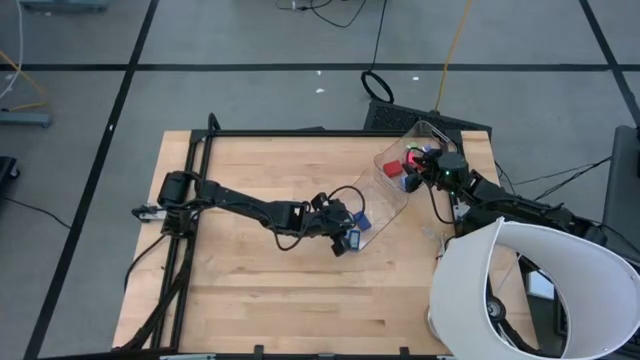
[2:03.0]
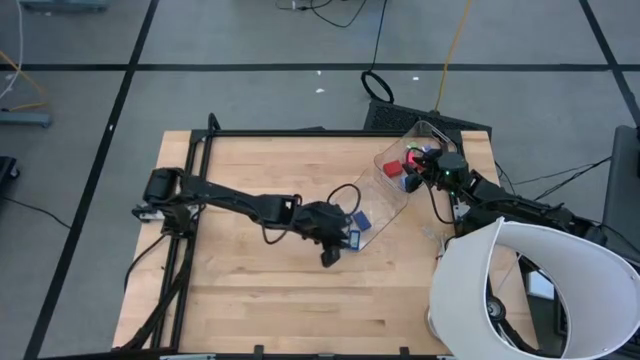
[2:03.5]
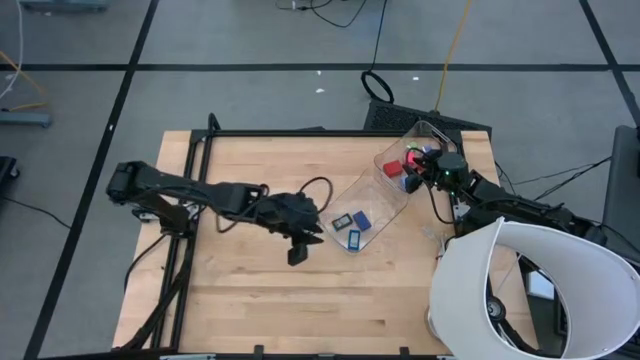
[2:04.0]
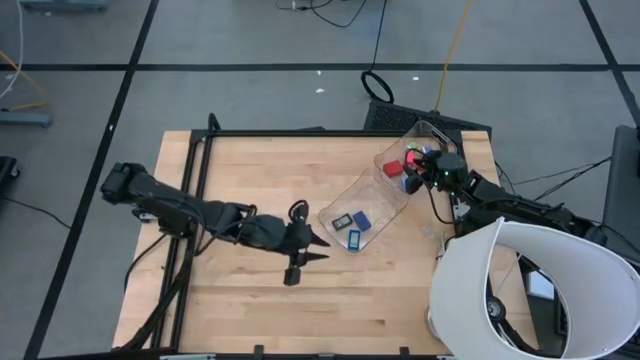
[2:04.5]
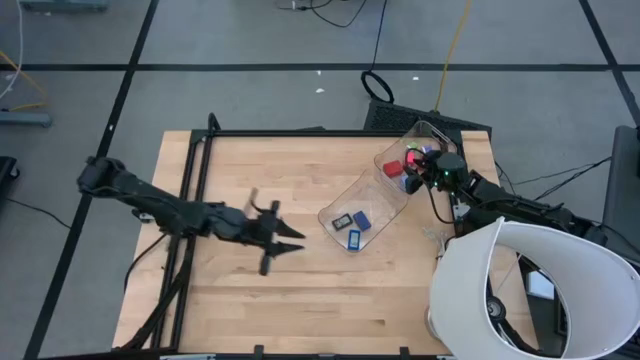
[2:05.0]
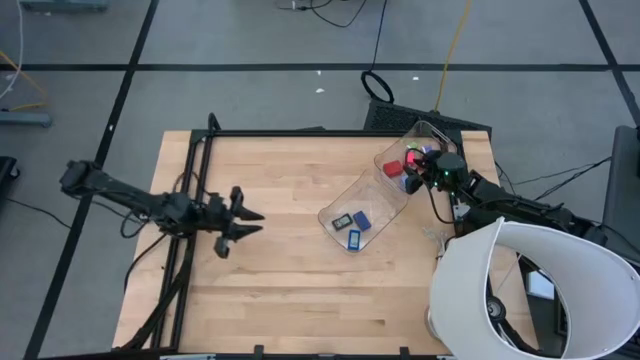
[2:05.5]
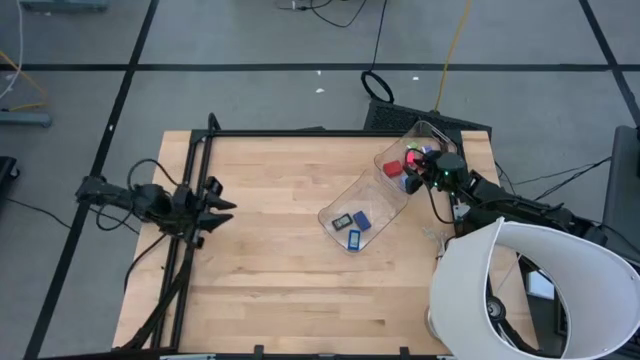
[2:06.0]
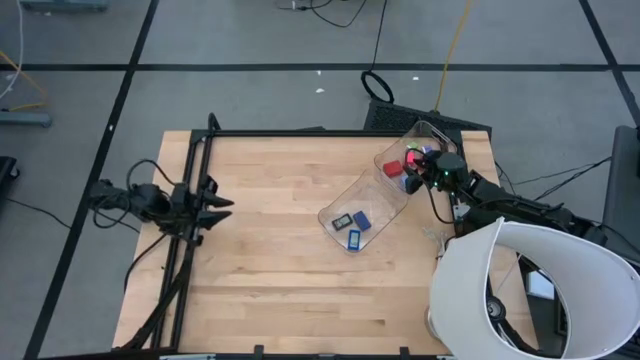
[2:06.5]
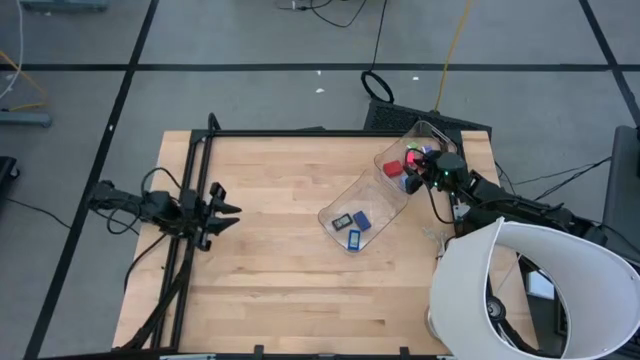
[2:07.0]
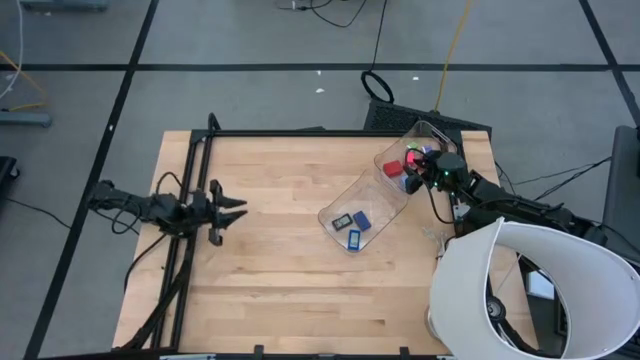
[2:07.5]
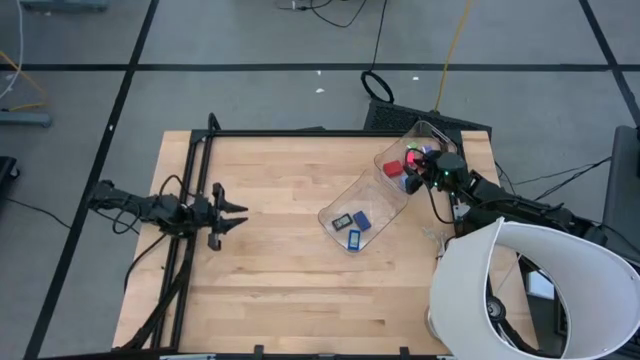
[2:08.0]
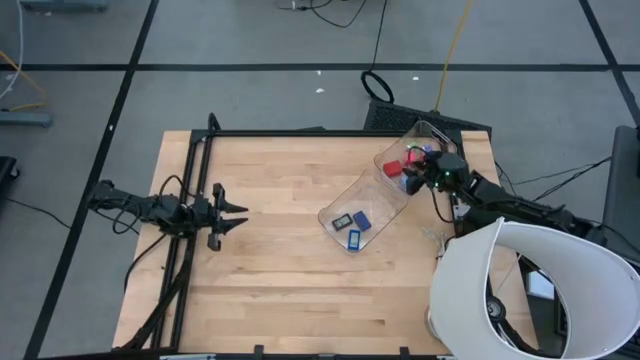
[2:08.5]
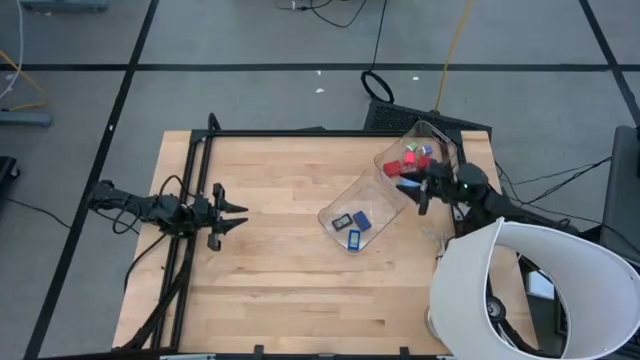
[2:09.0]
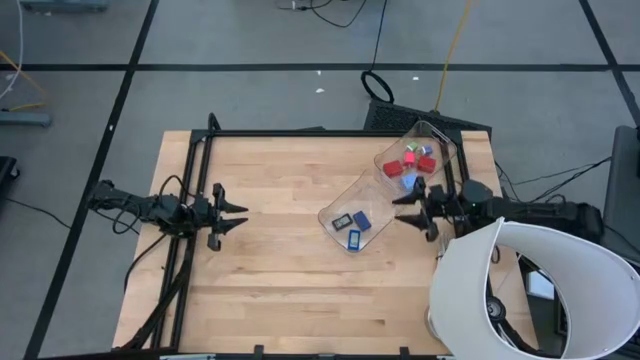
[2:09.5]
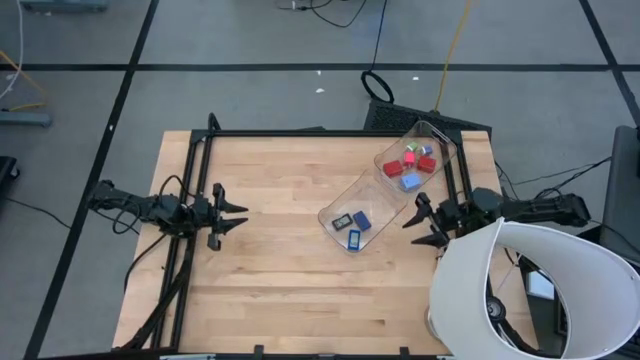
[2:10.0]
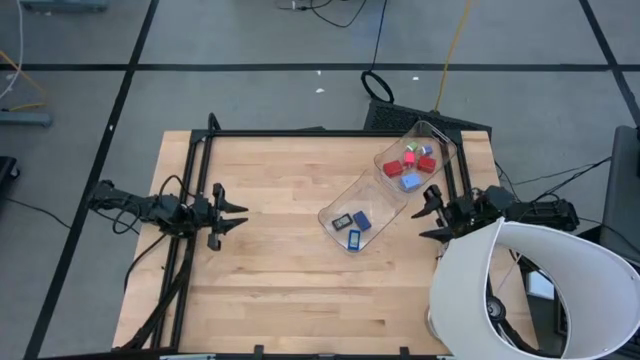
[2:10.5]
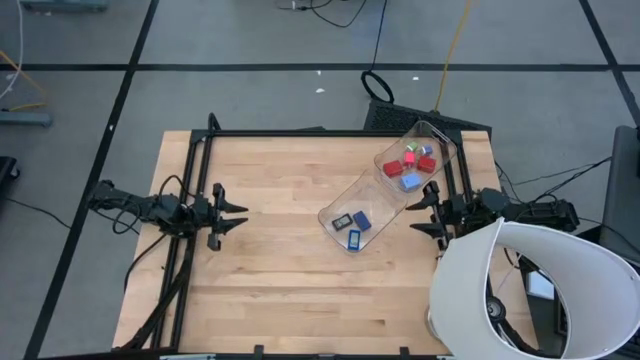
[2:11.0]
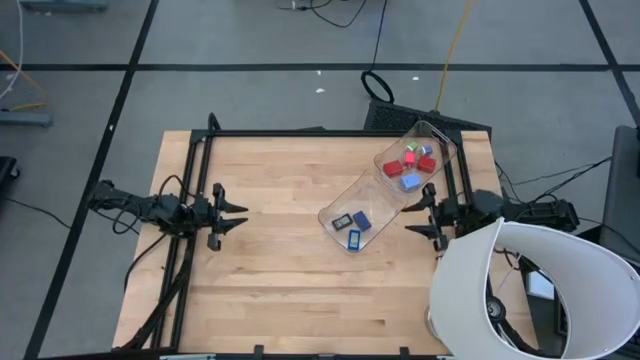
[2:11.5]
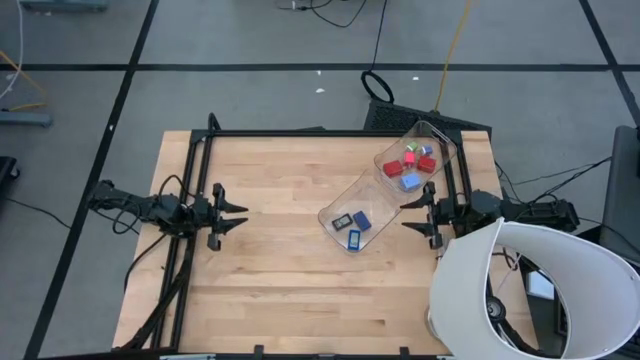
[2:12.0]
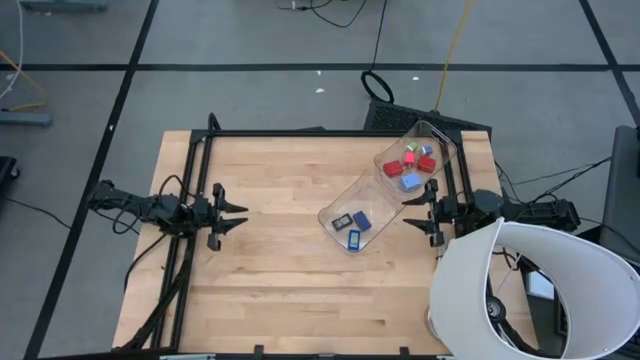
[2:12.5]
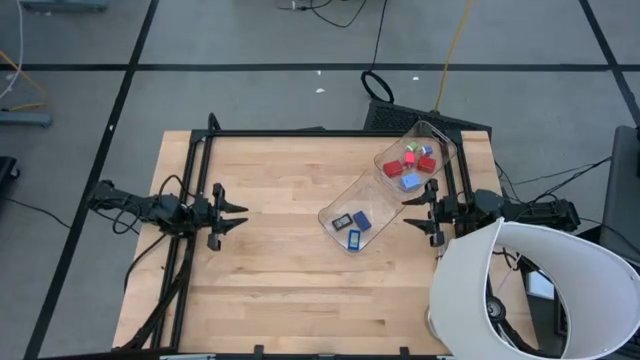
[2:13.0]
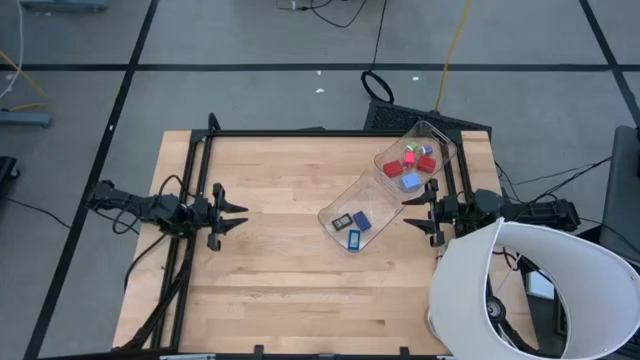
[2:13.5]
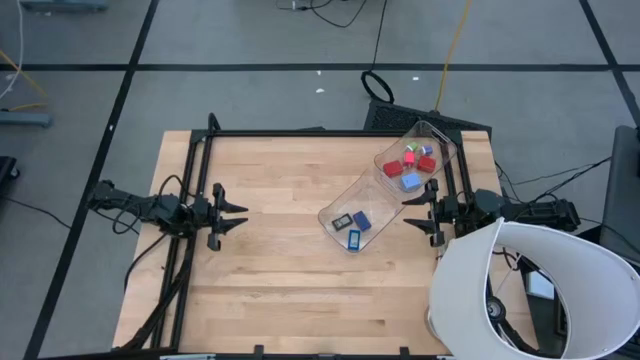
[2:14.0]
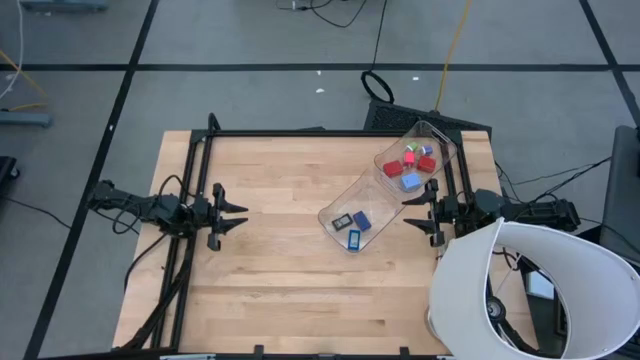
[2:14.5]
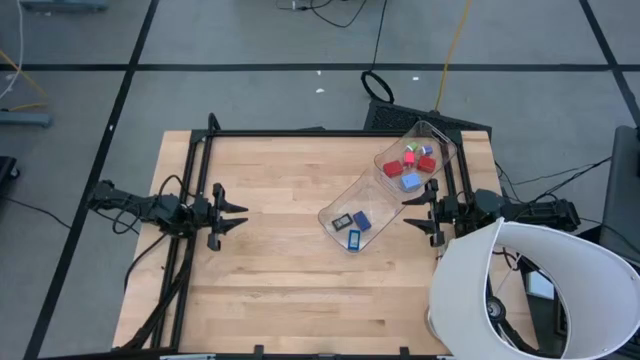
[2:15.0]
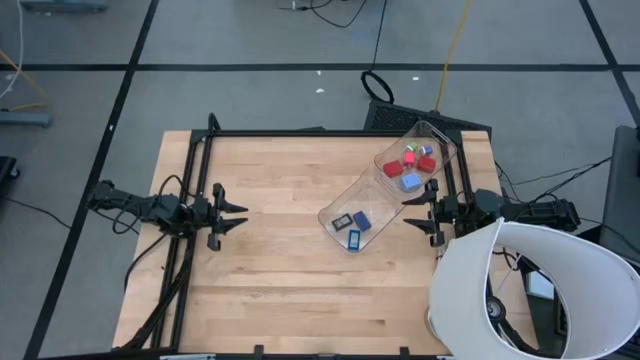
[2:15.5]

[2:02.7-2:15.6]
Task: Pick & Place Office items
Return to Home Position

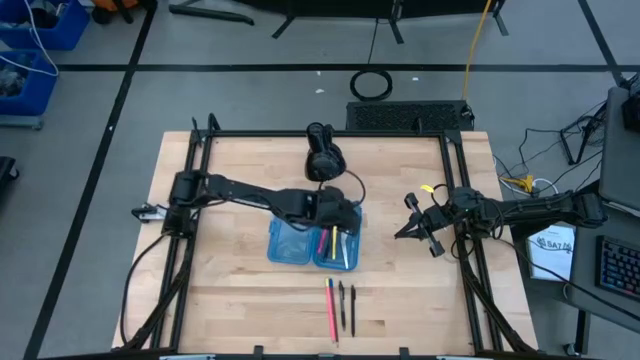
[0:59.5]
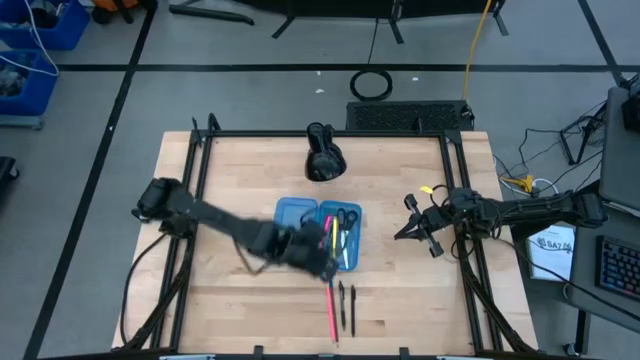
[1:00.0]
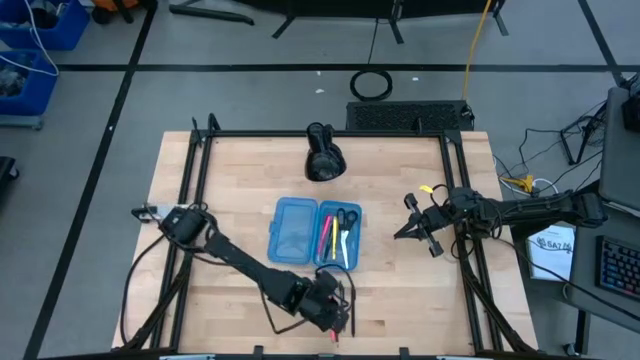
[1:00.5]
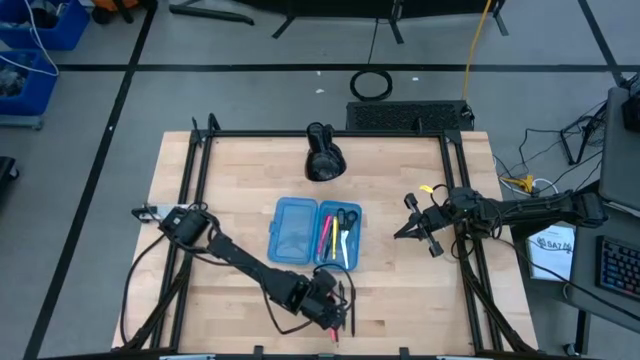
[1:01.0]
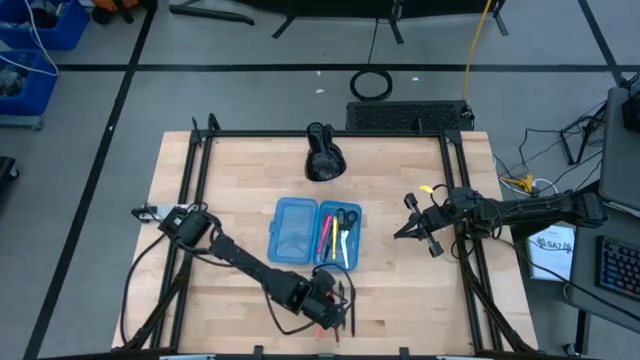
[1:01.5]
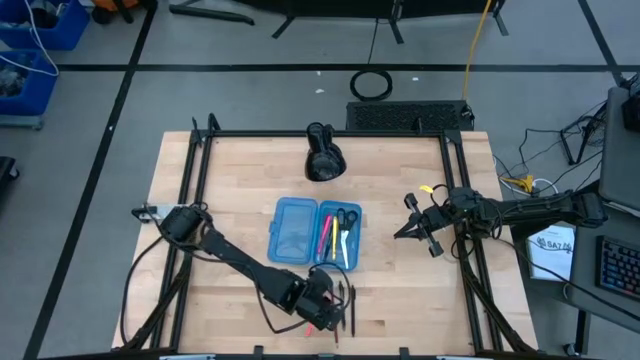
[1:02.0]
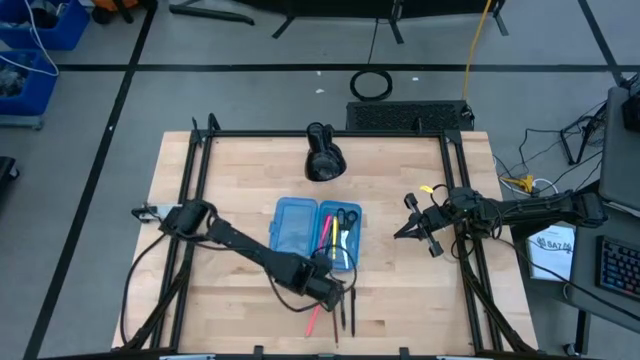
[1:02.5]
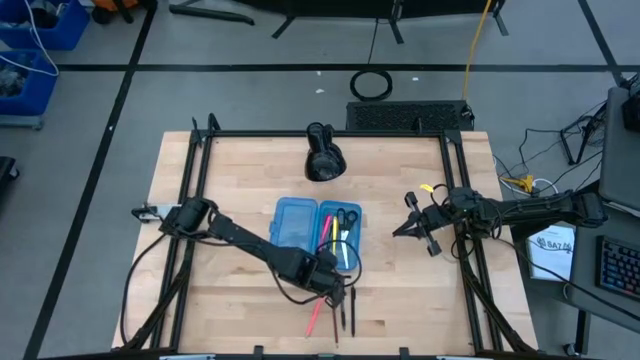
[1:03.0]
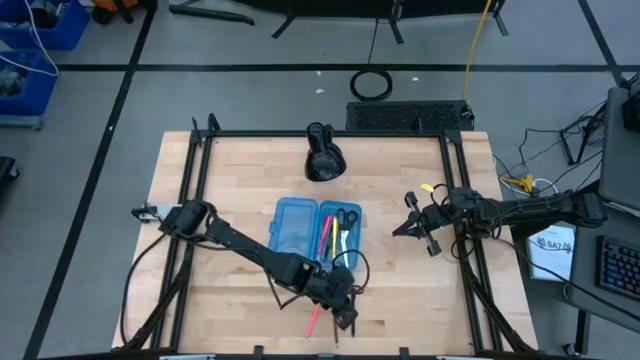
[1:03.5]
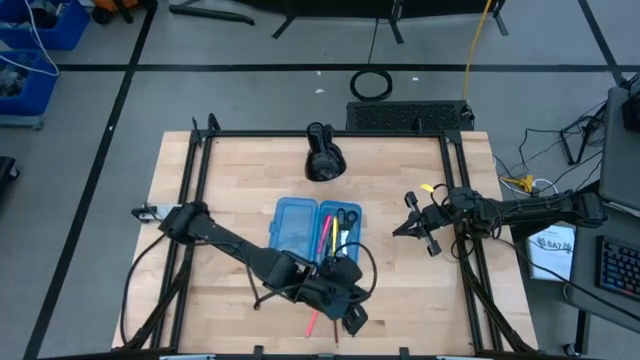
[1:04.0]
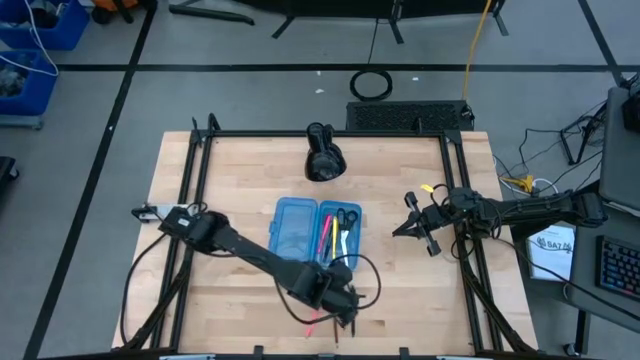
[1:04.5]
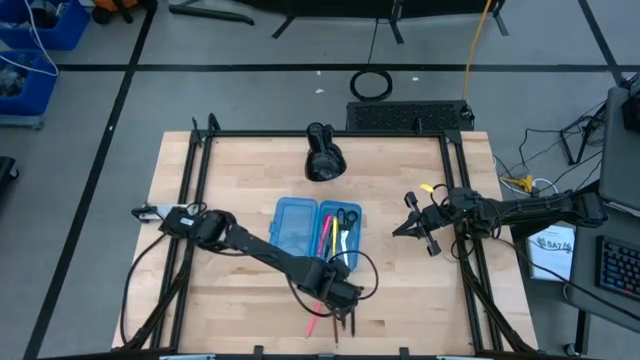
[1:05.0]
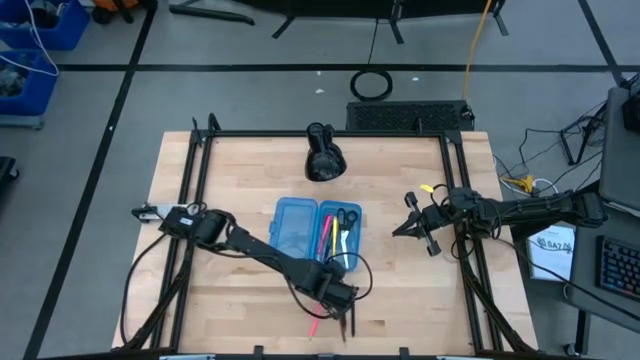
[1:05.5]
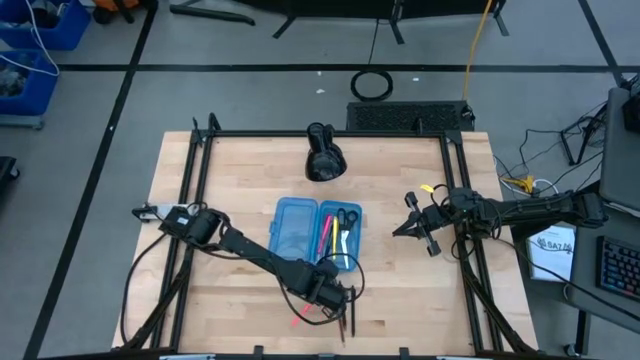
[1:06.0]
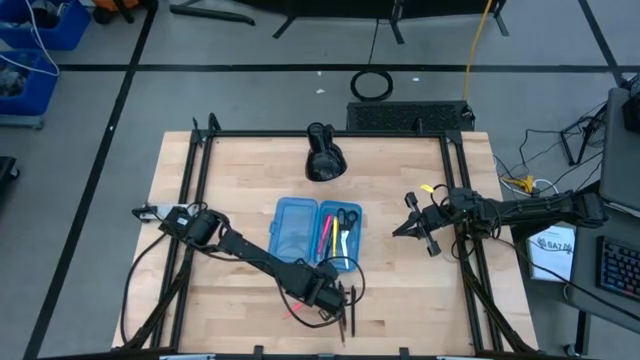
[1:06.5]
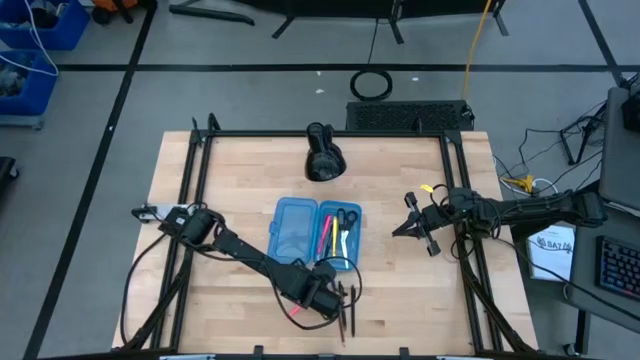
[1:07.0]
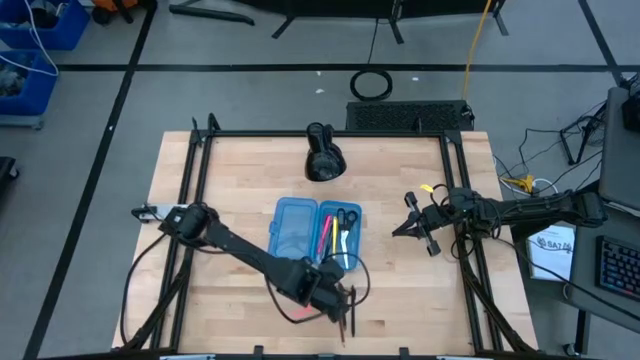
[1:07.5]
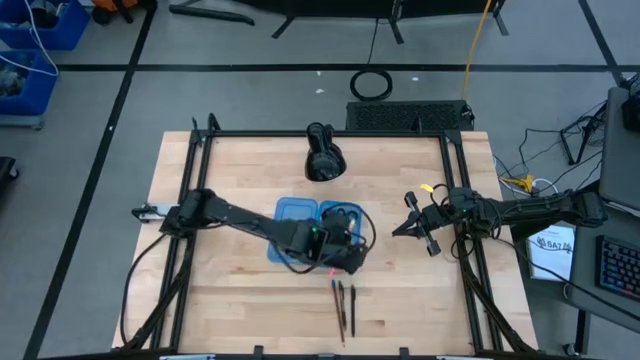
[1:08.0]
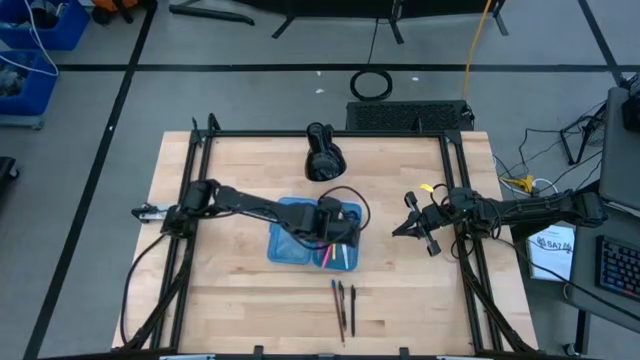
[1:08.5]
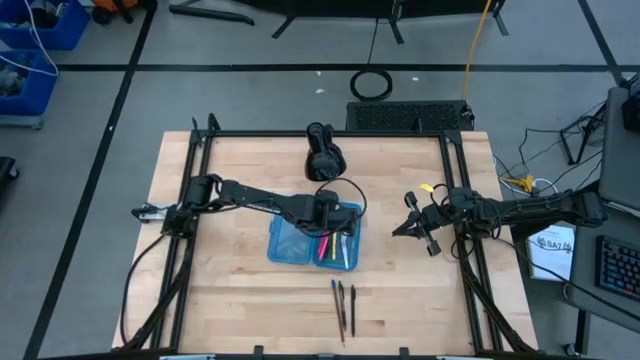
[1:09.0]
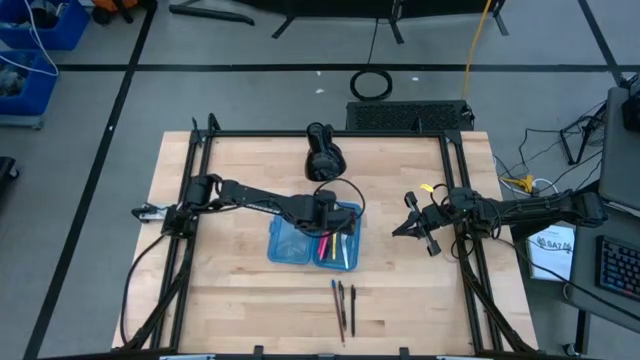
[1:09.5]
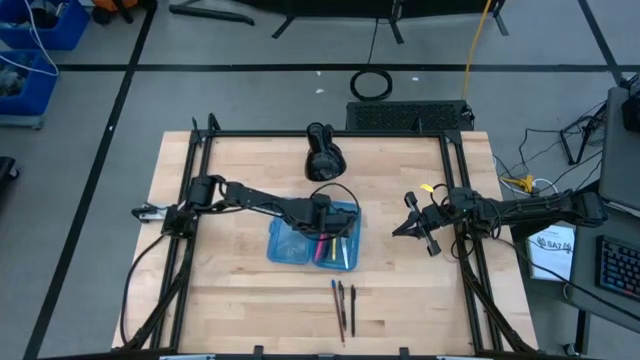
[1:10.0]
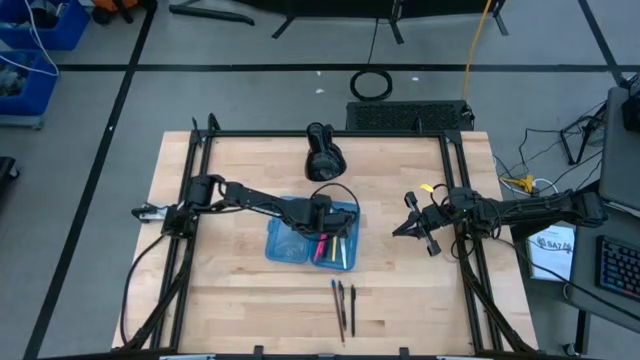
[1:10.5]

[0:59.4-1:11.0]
Task: Pick & place school supplies into a supply box
Put the pink pen into the blue supply box
